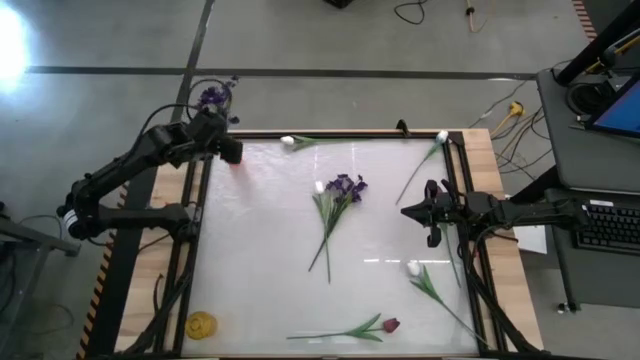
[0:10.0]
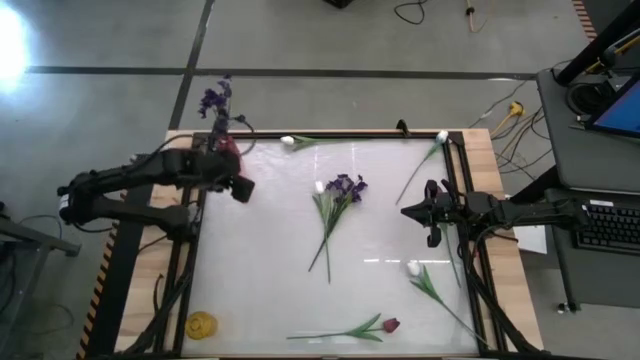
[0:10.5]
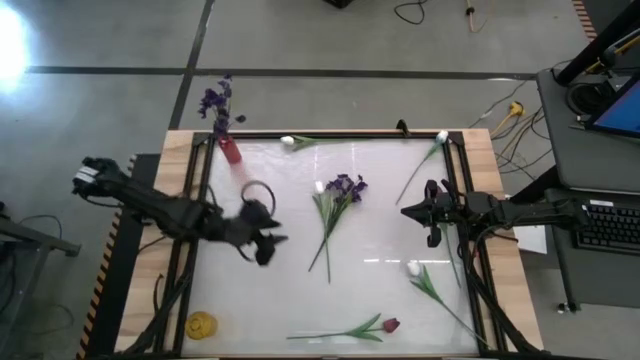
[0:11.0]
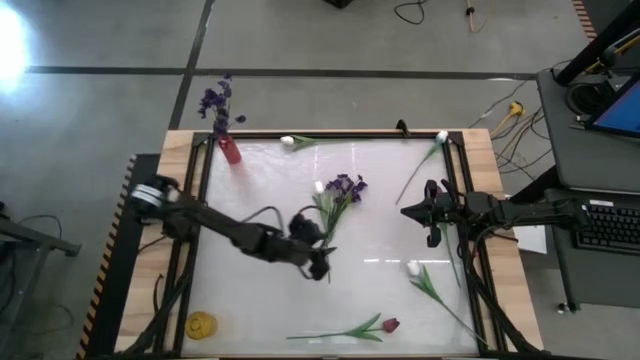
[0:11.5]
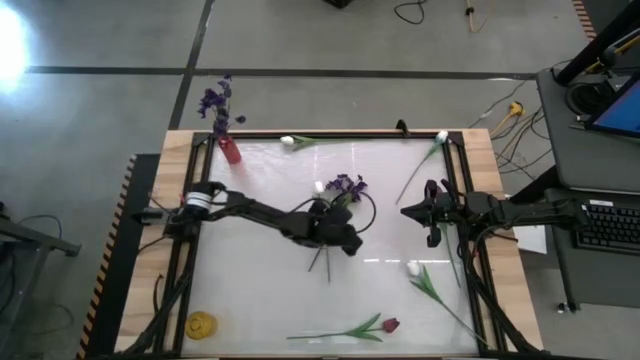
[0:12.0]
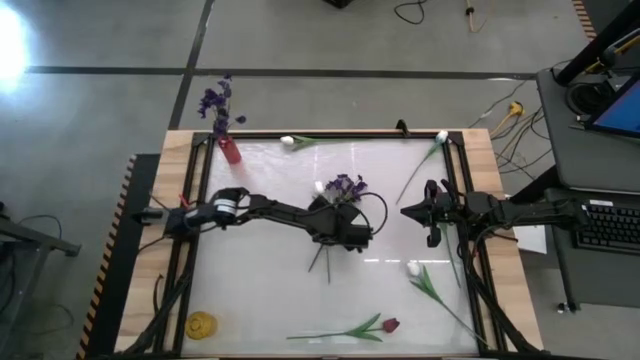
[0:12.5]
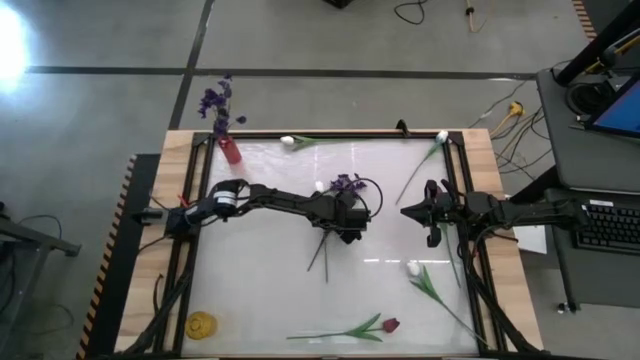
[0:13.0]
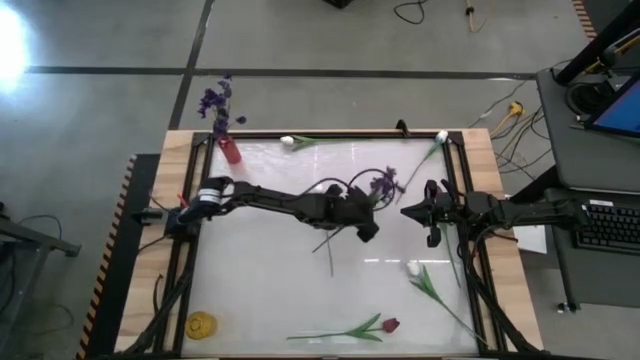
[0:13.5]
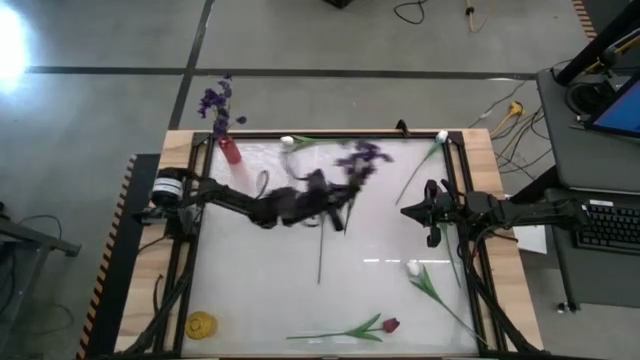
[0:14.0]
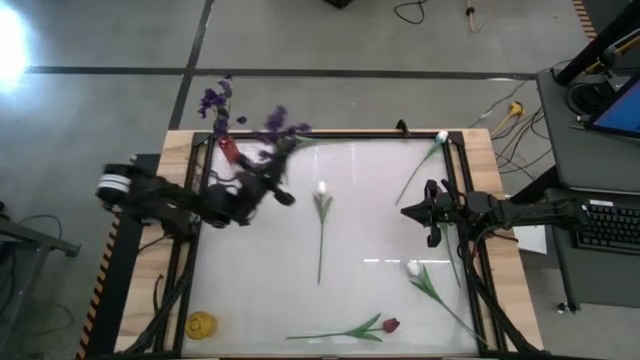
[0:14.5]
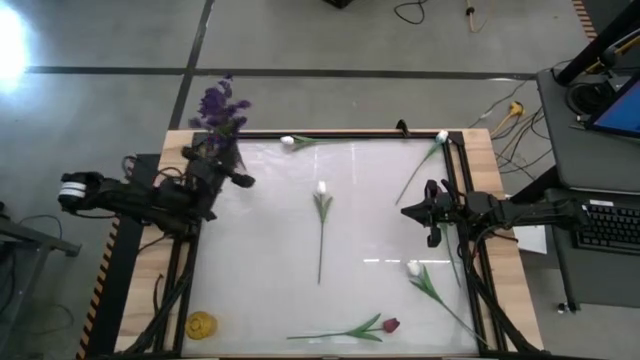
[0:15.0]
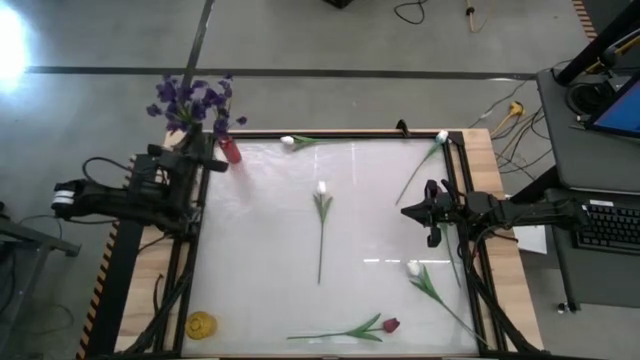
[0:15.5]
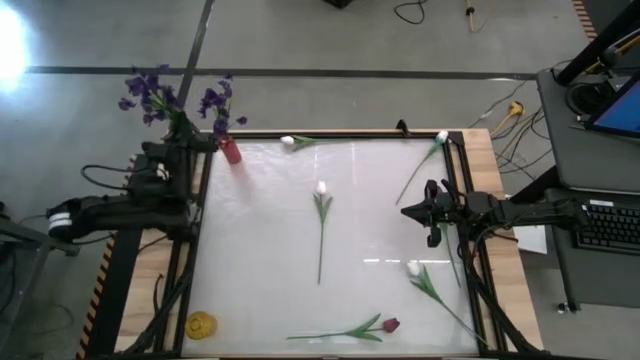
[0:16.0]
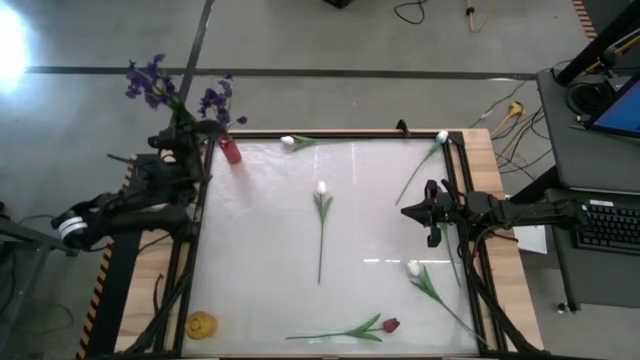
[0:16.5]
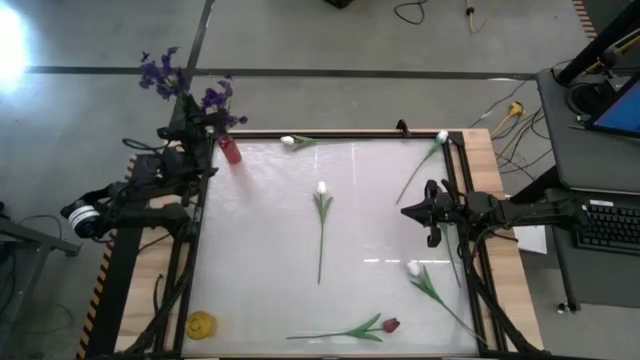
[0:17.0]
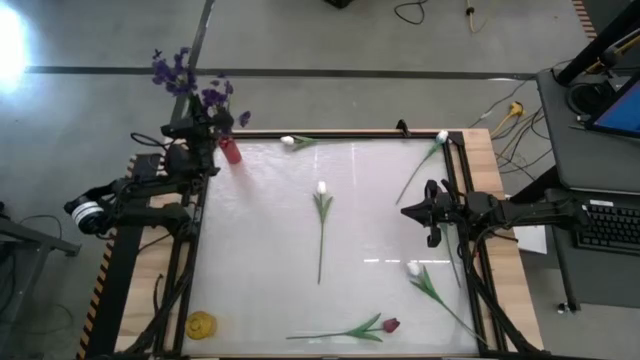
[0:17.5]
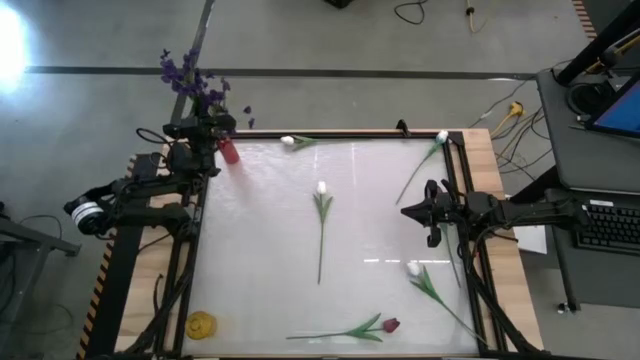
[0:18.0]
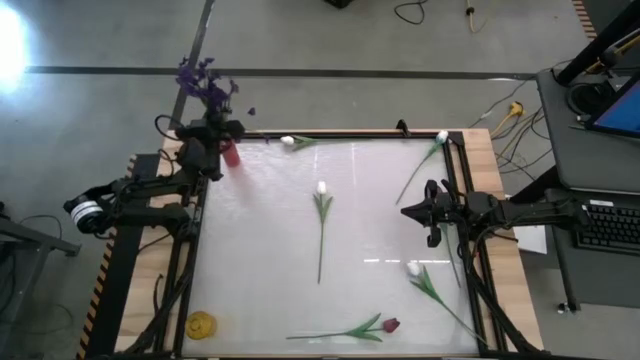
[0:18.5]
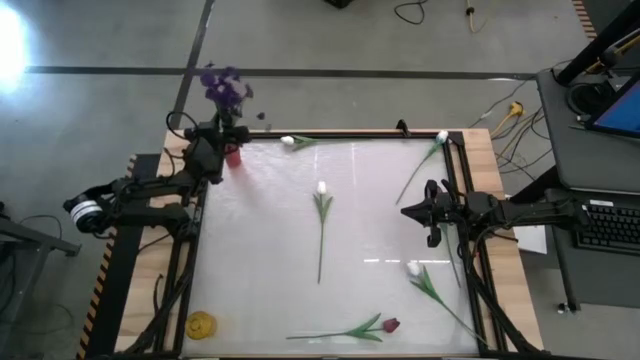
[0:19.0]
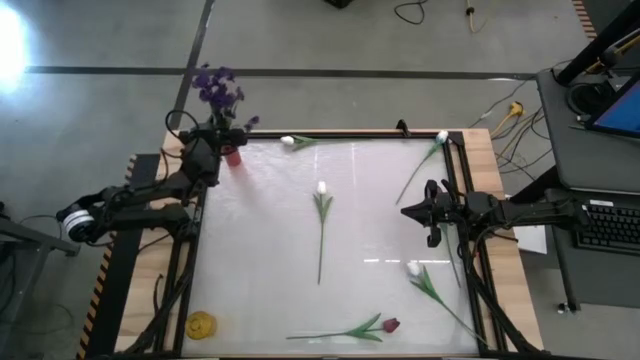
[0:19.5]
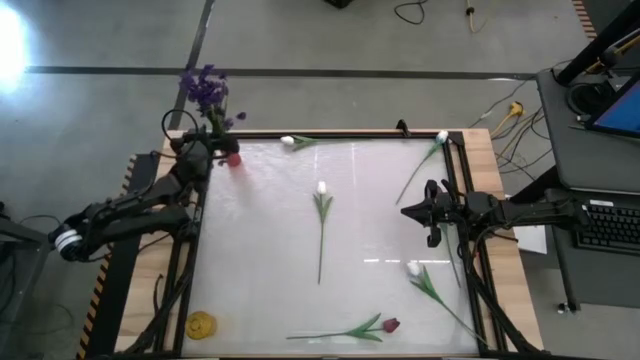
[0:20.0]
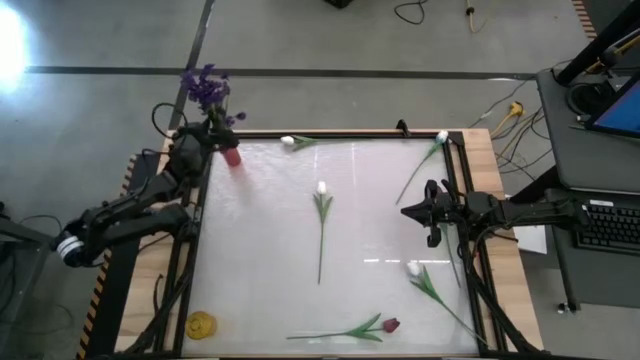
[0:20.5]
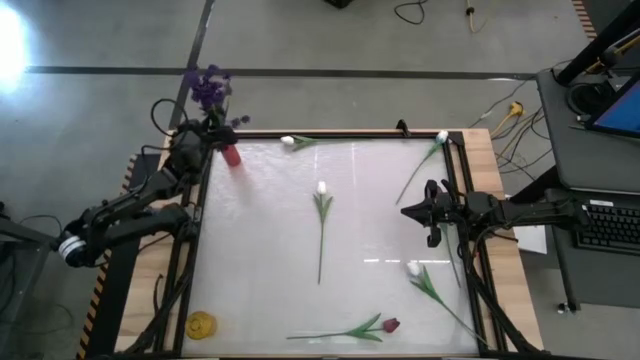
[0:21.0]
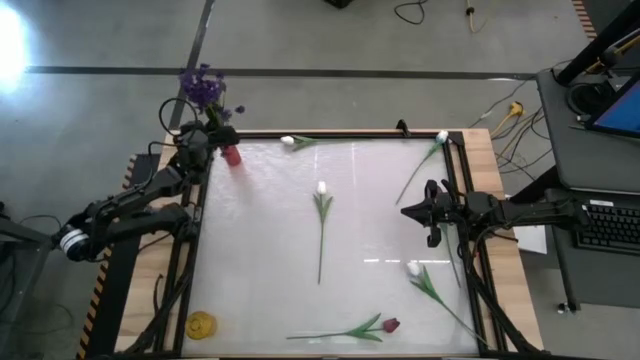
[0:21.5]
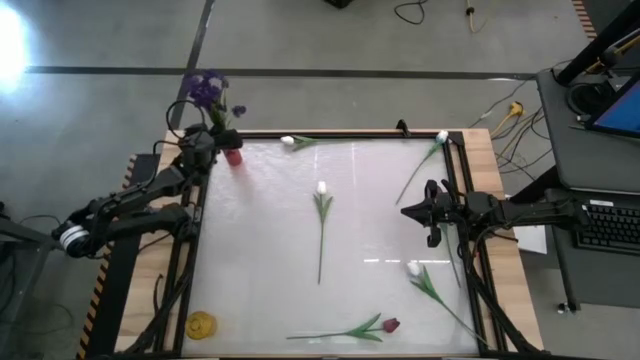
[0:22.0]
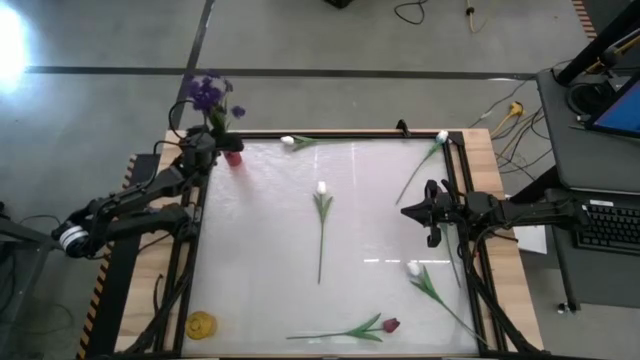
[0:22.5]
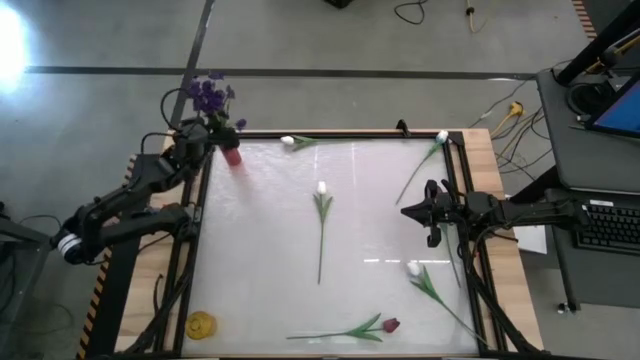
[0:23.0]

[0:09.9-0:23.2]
Task: Sort flowers into vase by color
Put the violet flowers into the red vase

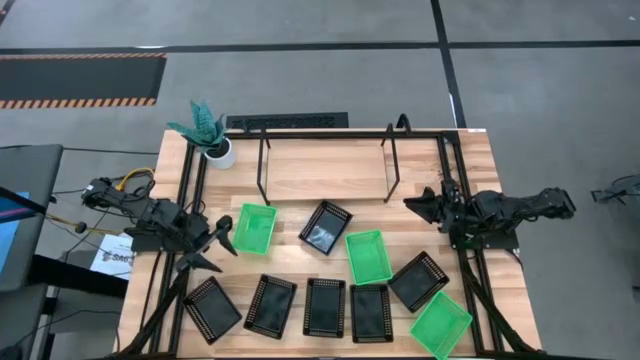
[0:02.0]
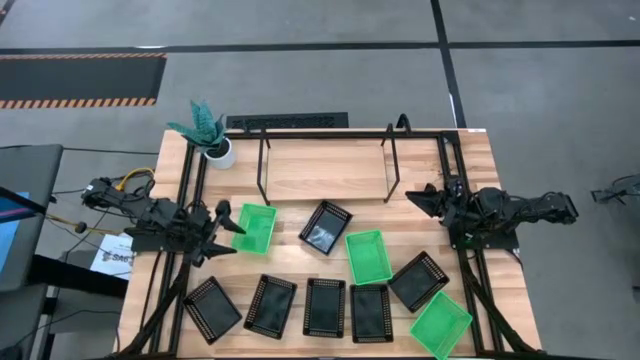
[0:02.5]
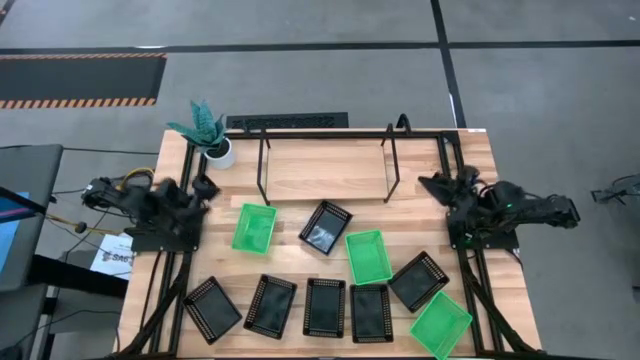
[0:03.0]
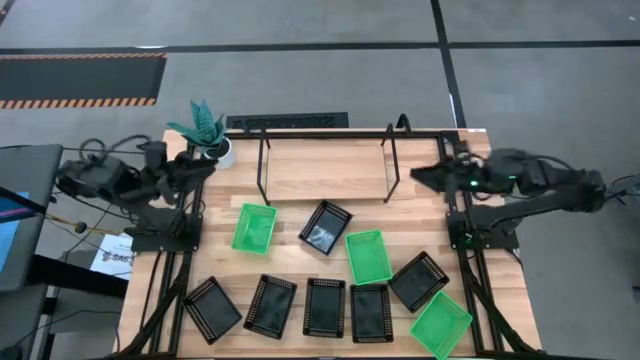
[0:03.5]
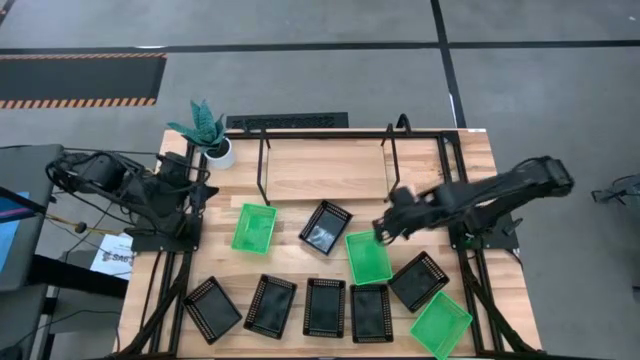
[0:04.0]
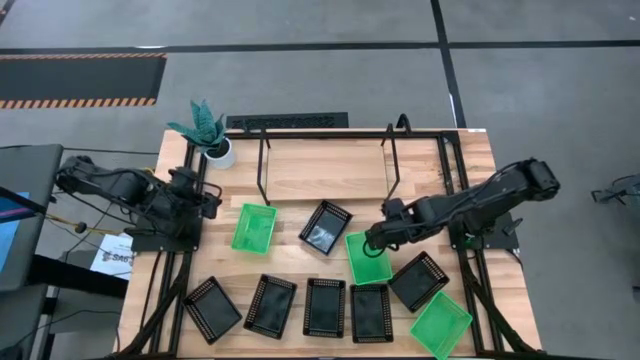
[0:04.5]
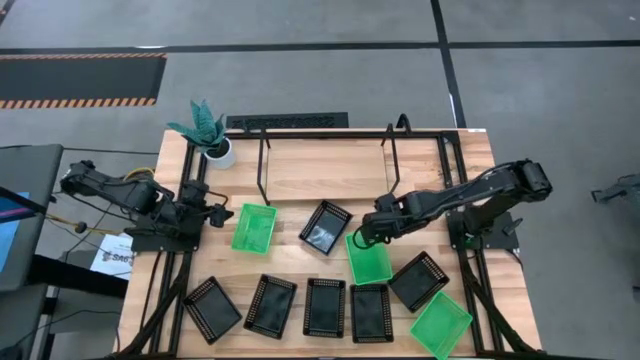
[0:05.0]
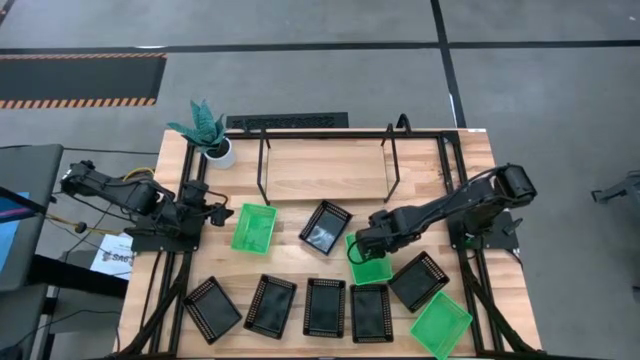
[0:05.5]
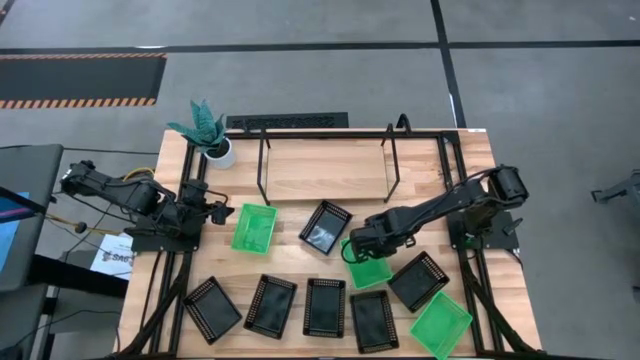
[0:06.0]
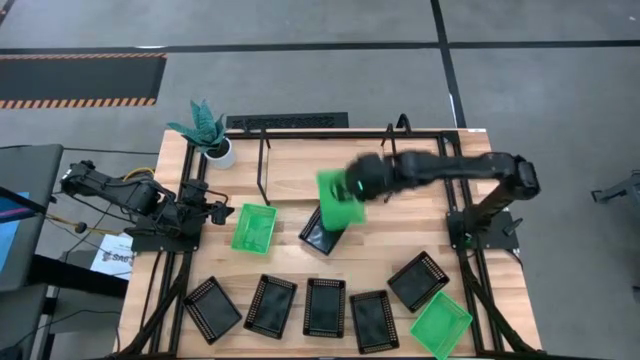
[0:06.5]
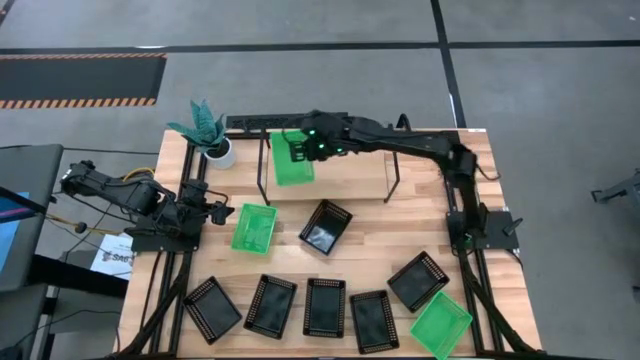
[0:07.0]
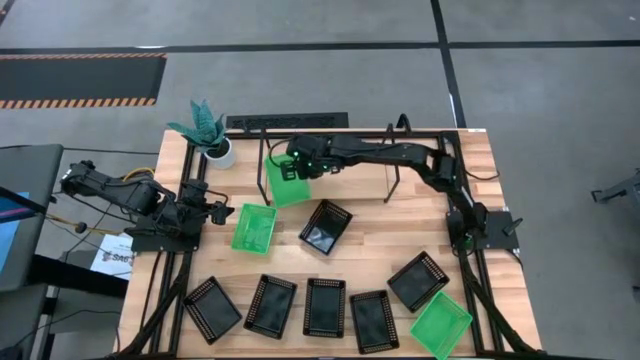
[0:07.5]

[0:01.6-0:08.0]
Task: Stack baskets on shelf by color
Put the middle green bin on the shelf
